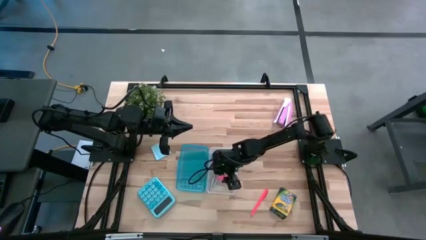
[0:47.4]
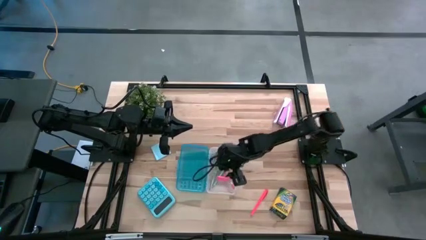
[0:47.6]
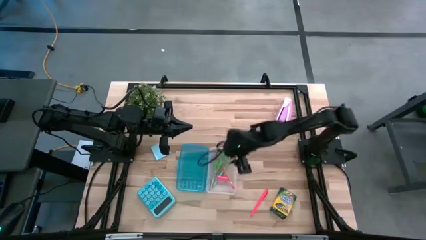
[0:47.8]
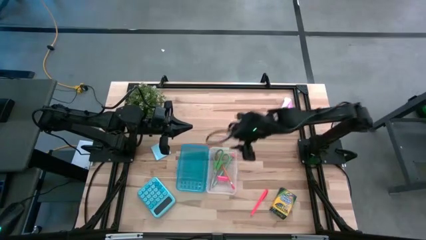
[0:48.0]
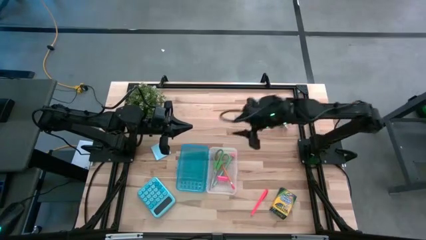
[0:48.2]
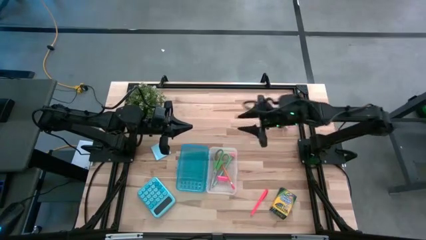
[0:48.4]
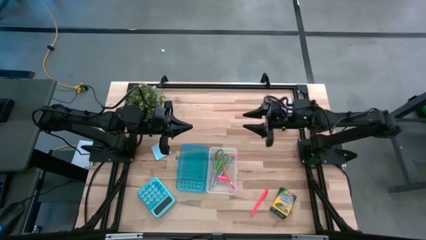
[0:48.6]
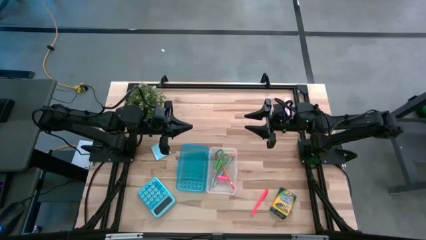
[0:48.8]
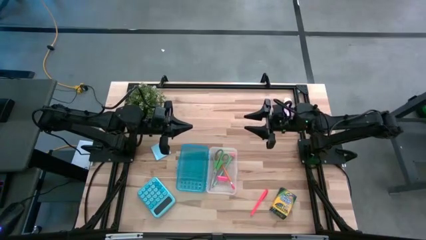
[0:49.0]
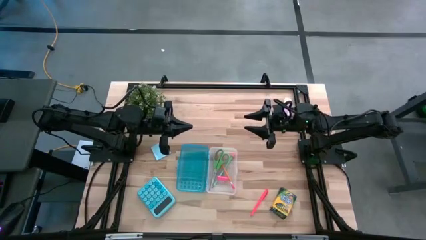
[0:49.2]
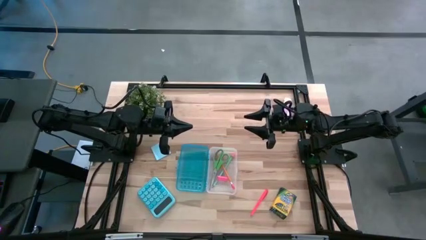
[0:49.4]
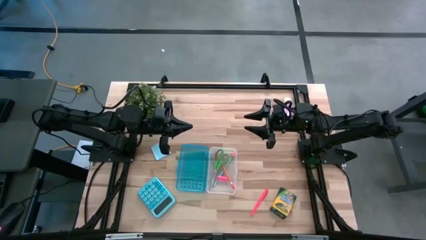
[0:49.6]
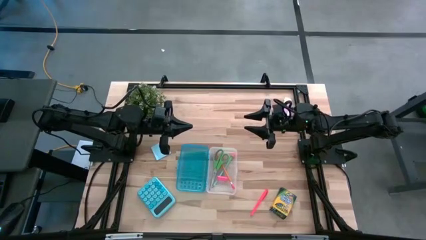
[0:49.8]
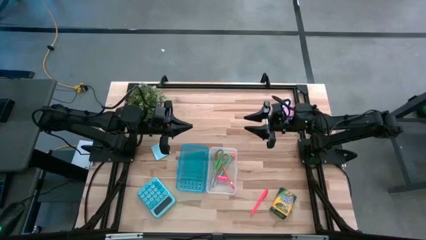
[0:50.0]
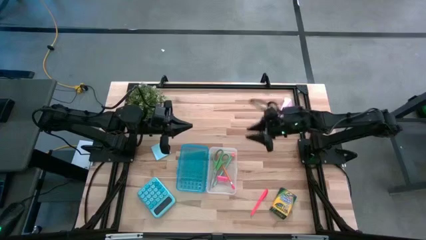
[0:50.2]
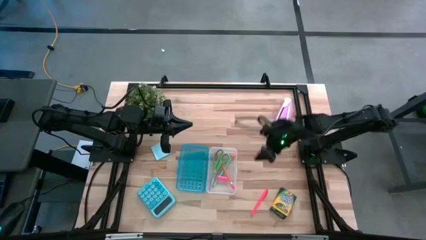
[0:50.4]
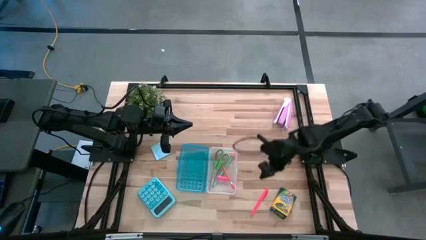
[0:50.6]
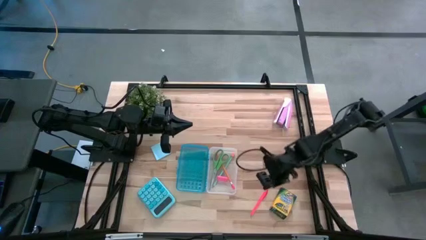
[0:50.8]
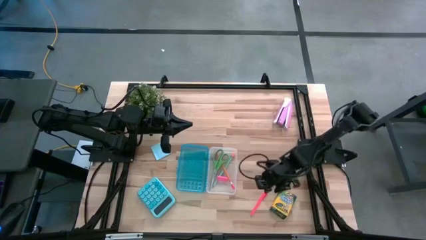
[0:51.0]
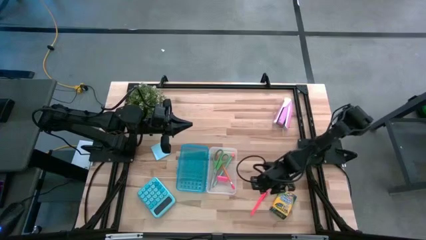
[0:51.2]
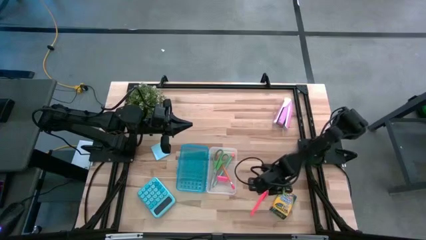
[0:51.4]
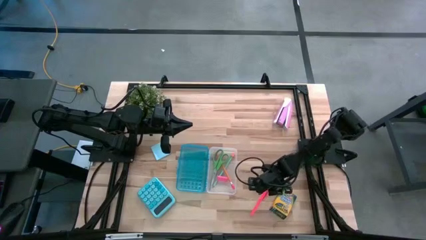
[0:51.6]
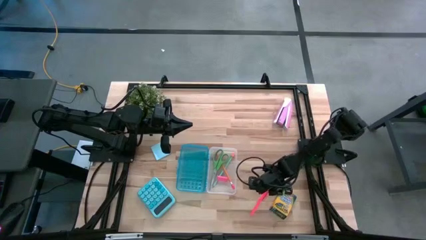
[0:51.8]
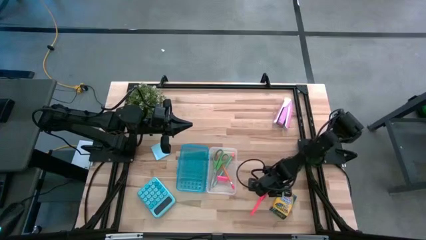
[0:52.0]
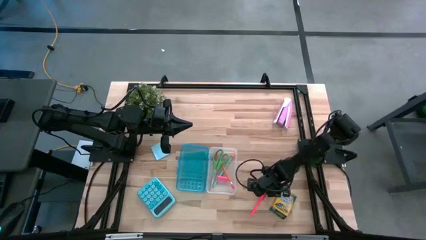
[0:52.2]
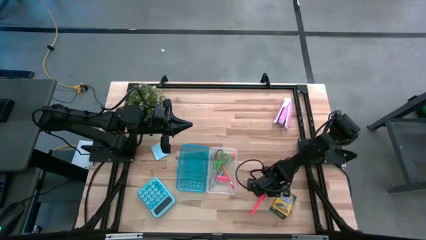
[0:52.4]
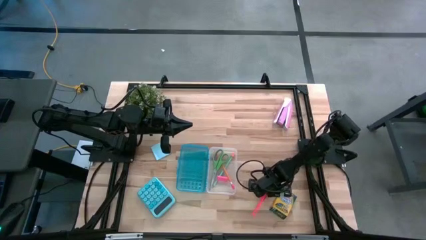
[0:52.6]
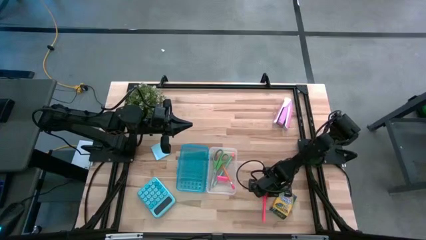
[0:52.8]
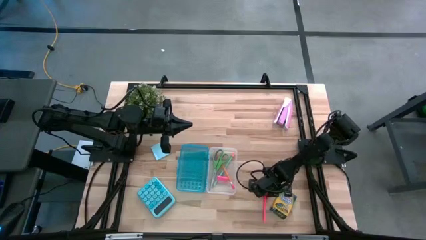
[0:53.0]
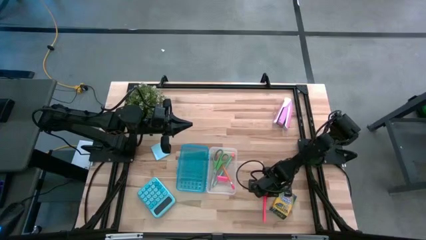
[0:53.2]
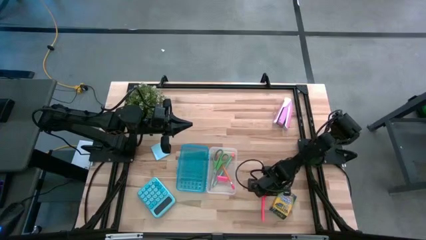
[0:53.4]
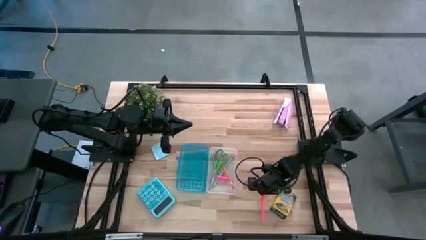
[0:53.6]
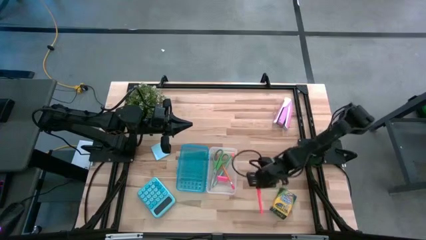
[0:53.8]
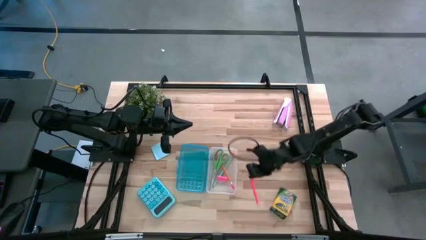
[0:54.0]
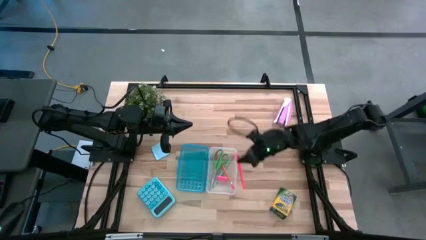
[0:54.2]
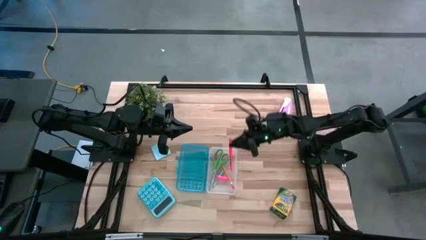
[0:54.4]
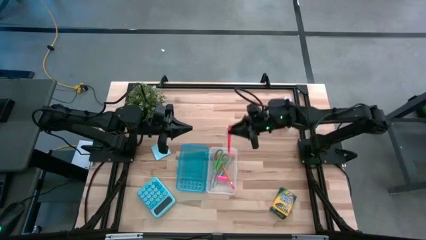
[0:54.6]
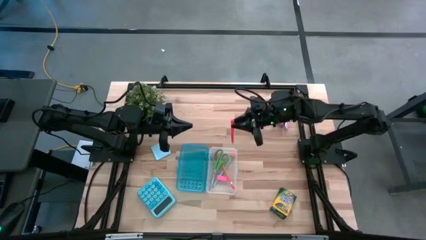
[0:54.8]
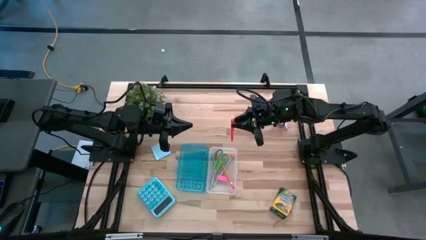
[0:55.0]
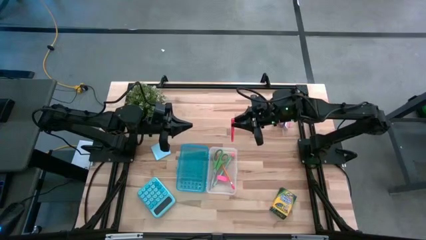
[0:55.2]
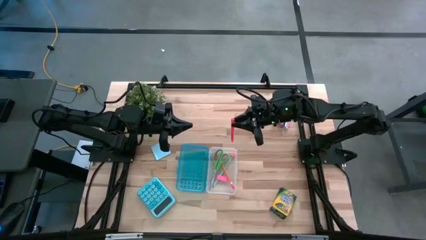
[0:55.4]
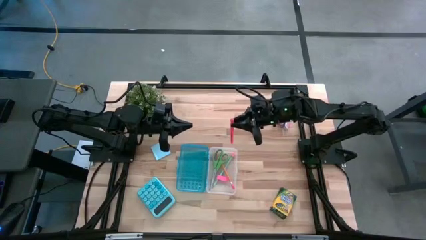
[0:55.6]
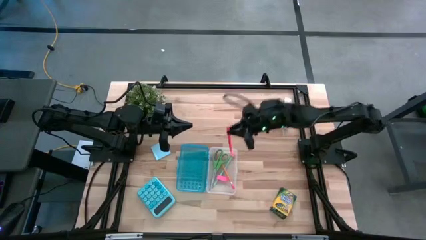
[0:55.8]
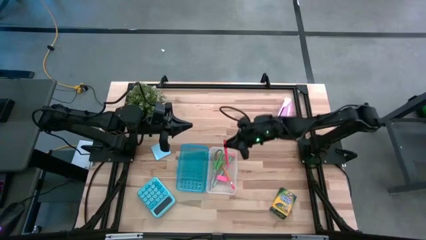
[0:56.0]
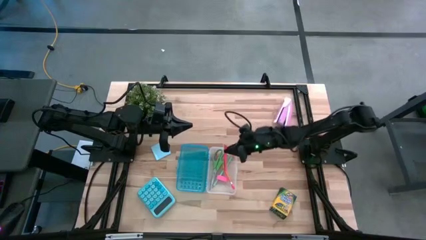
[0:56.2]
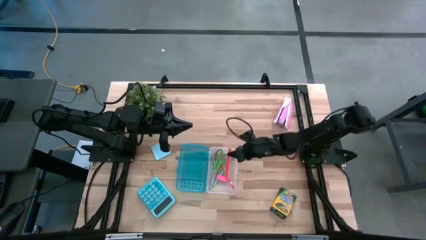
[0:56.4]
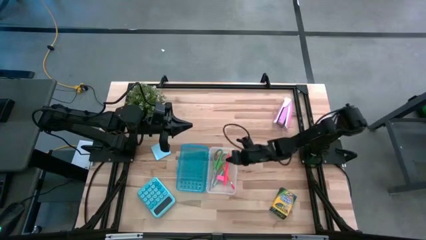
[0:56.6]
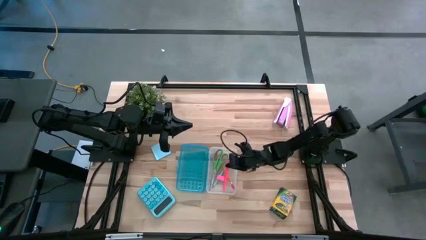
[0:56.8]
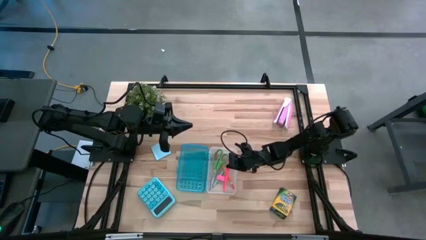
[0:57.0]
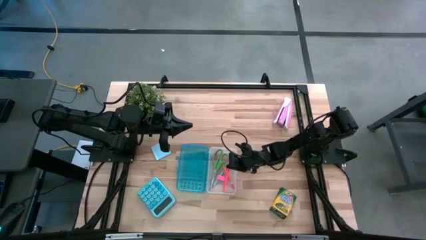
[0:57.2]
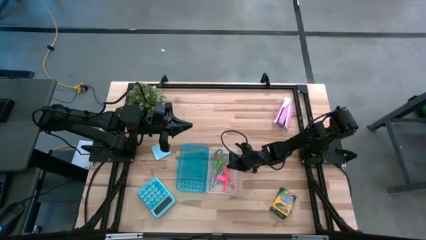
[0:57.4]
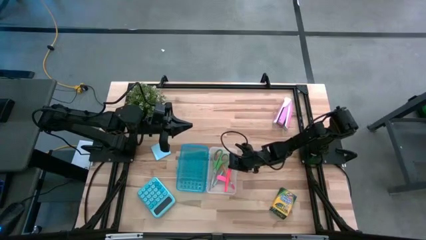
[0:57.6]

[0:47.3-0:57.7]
Task: Pack school essentials
Put the orange pen into the blue supply box

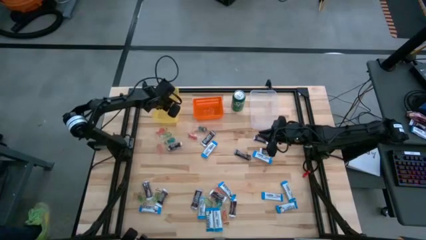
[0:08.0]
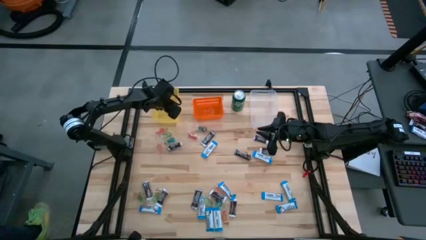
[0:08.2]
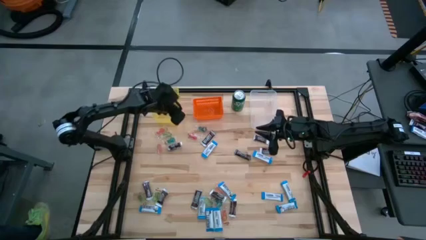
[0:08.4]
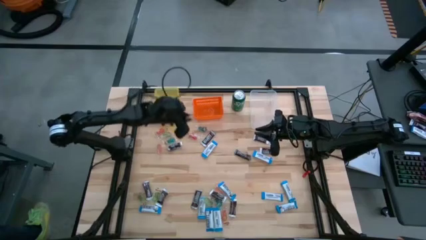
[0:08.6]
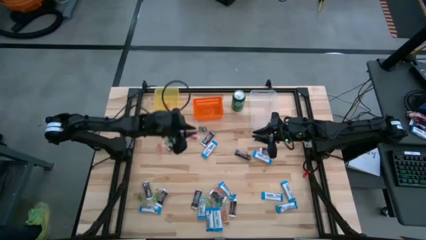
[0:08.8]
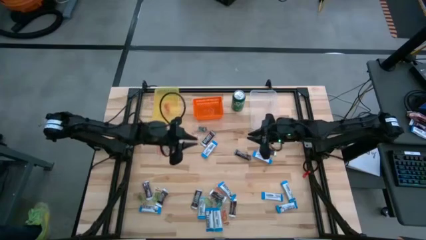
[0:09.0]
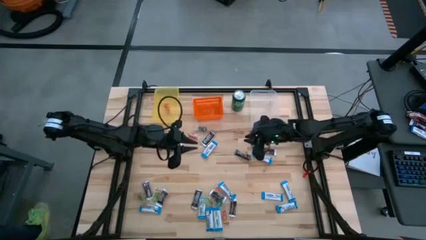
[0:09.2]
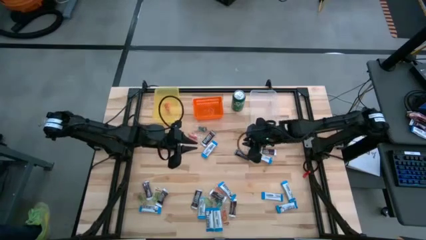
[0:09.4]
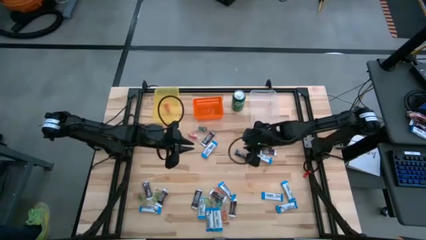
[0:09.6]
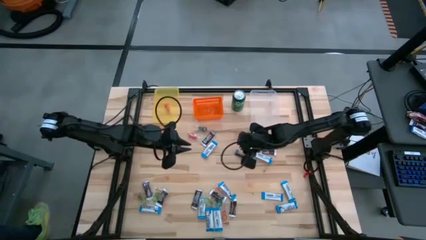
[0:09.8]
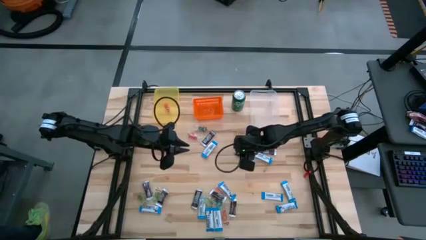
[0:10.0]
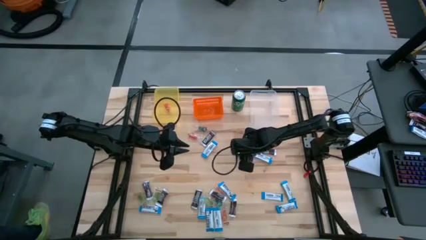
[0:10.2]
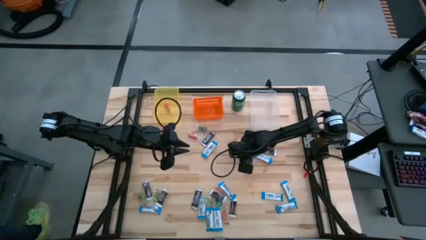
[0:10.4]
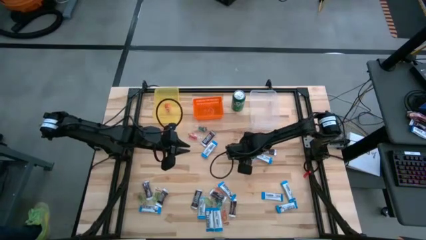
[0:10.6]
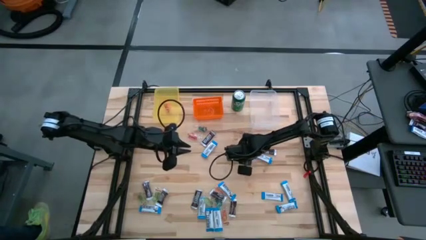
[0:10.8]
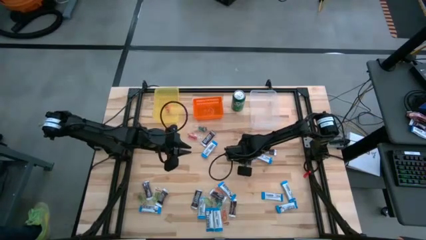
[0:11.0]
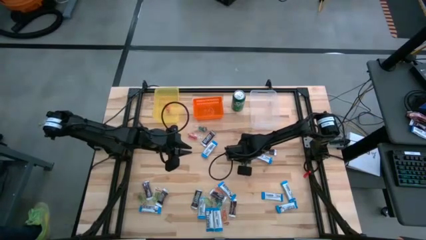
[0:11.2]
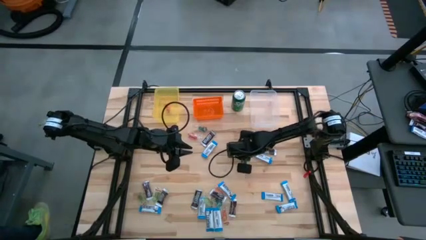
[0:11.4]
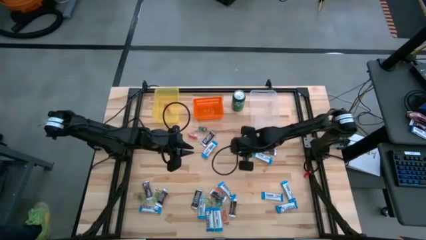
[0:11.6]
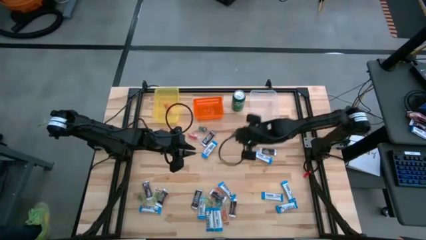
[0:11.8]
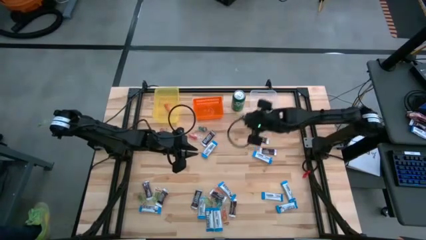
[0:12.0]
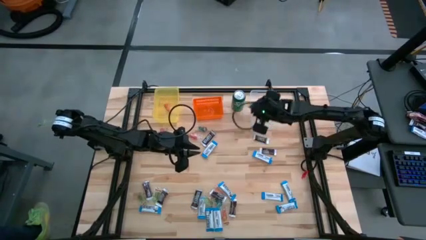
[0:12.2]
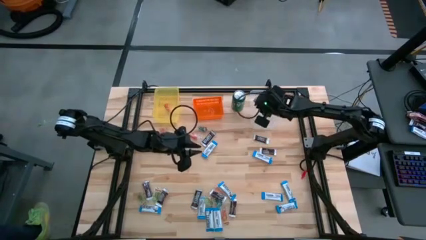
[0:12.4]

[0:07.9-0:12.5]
Task: Organize candy in baskets
Put the brown chocolate into the transparent bin

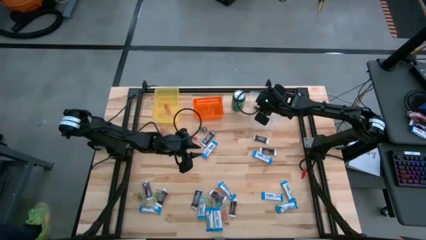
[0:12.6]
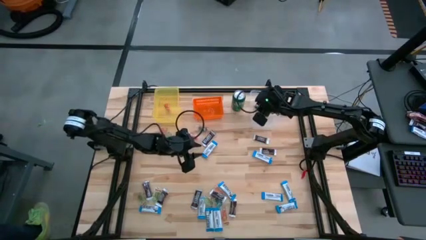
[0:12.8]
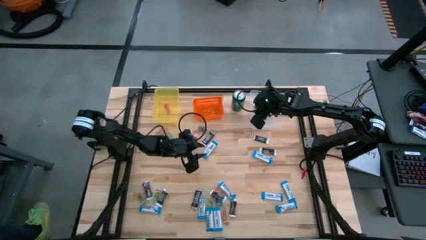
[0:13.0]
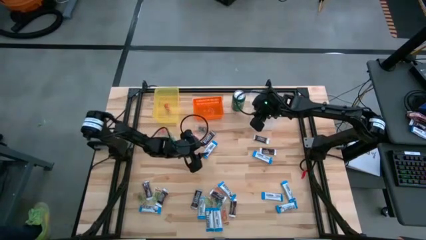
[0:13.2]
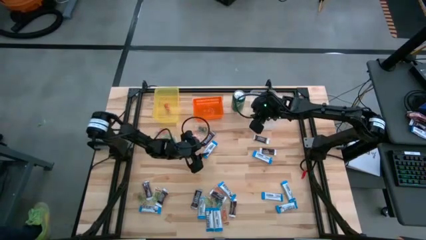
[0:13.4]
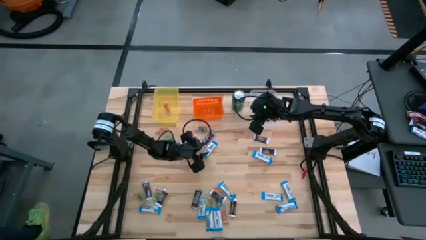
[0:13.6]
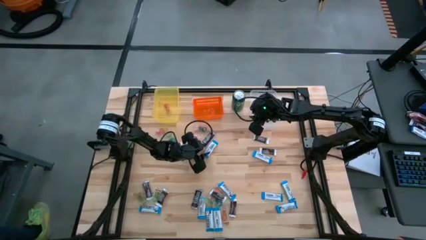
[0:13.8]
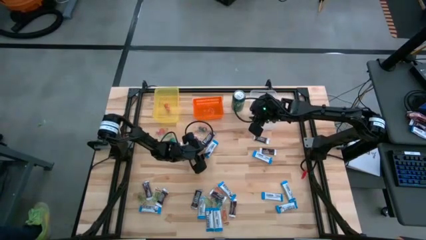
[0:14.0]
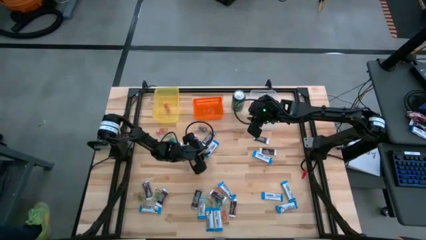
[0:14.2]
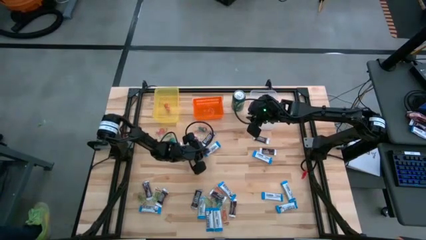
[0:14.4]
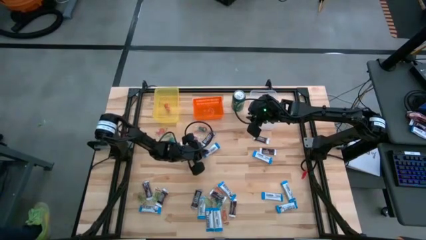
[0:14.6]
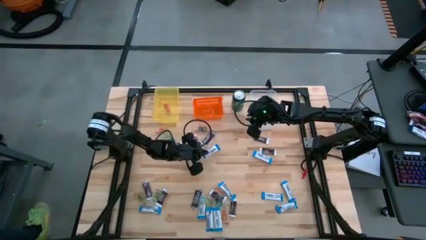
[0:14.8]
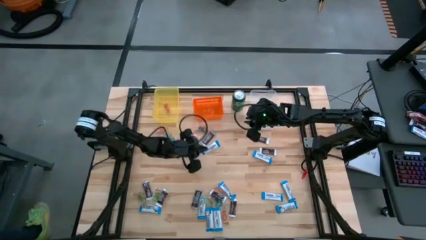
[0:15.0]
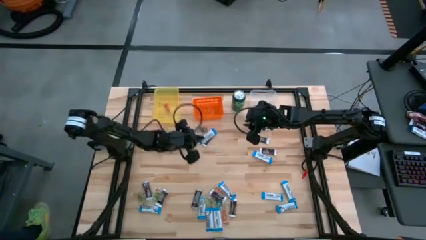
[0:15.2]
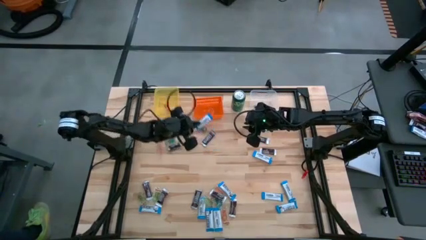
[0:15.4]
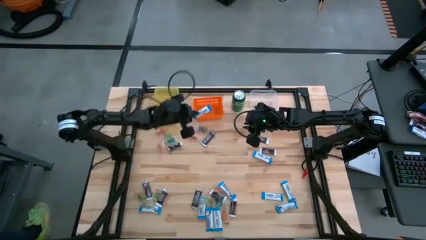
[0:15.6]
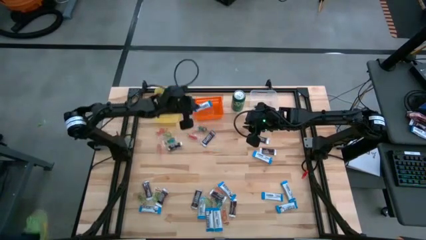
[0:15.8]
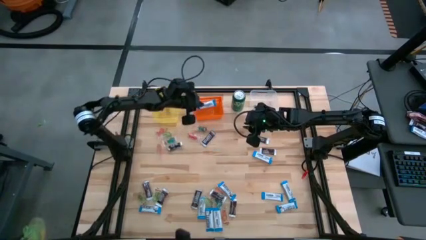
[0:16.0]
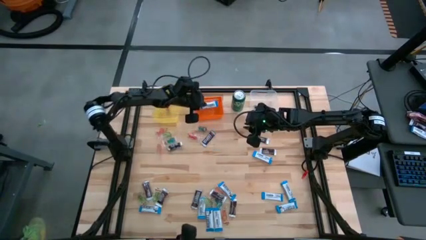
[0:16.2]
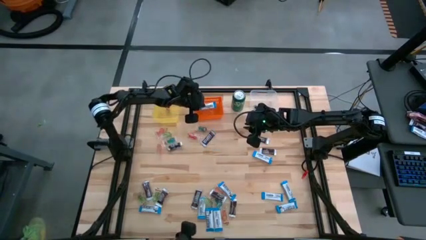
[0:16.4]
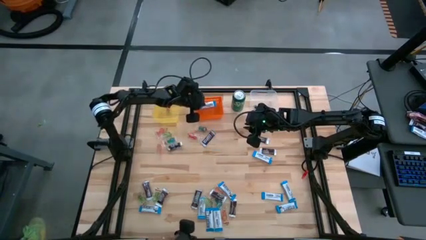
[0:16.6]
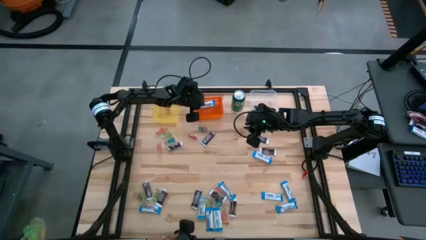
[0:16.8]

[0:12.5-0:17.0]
Put the white chocolate into the orange bin
